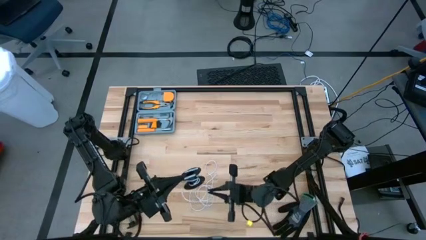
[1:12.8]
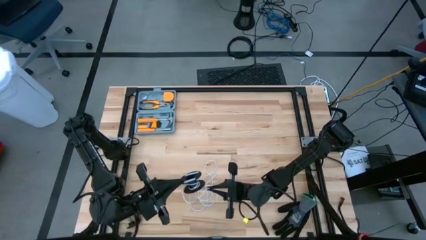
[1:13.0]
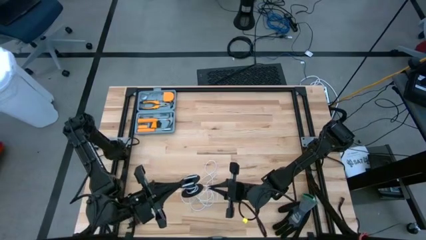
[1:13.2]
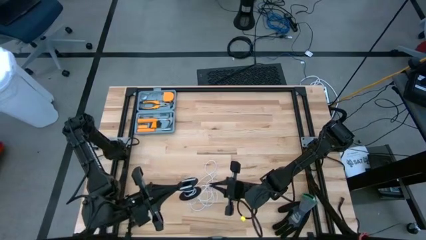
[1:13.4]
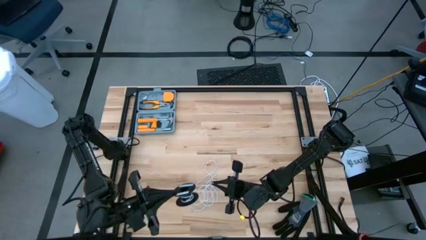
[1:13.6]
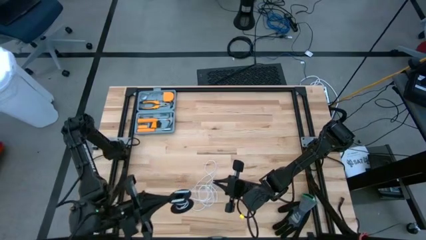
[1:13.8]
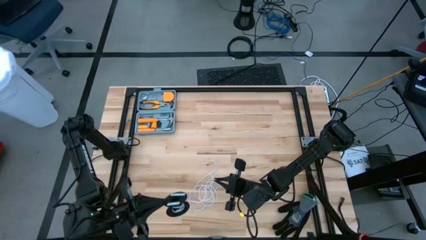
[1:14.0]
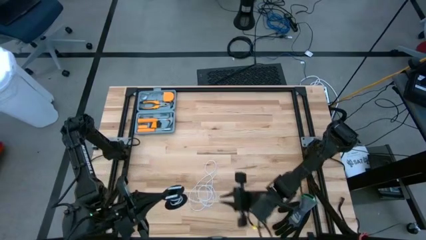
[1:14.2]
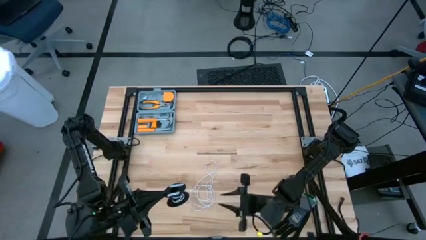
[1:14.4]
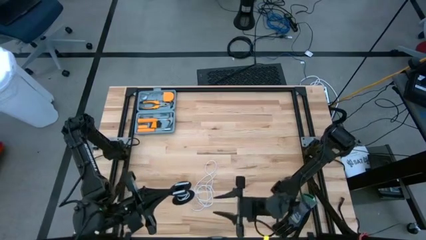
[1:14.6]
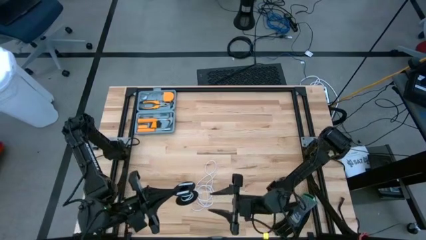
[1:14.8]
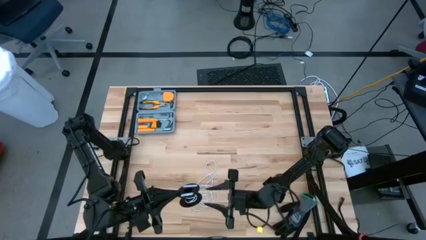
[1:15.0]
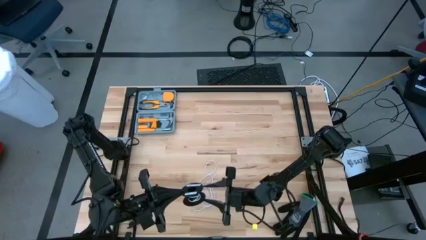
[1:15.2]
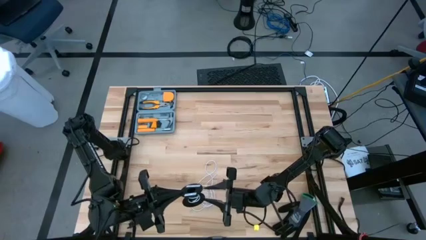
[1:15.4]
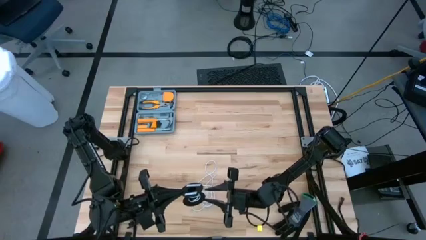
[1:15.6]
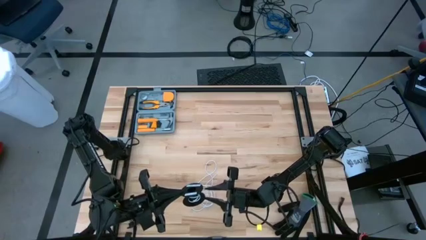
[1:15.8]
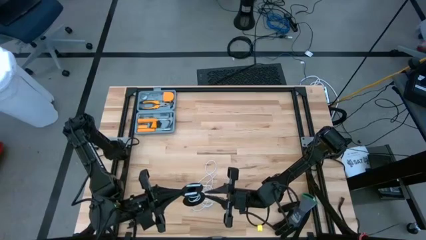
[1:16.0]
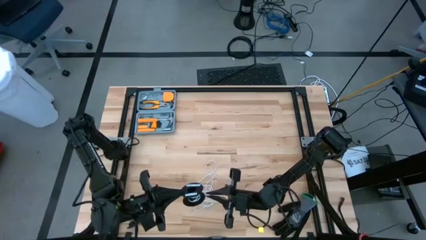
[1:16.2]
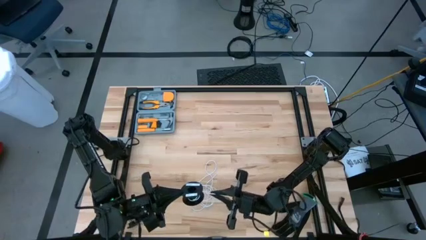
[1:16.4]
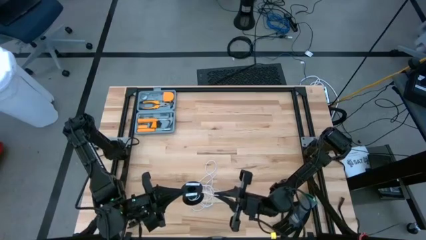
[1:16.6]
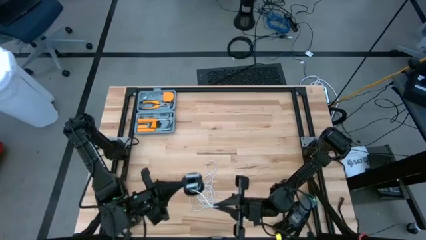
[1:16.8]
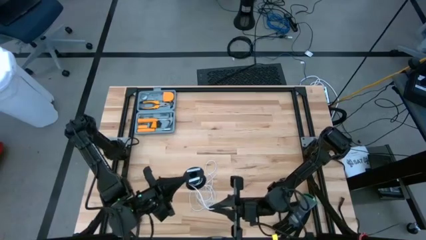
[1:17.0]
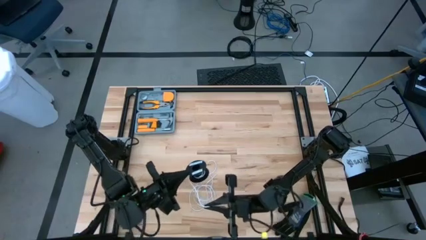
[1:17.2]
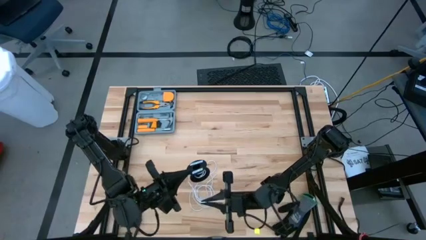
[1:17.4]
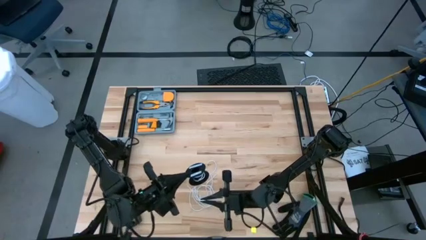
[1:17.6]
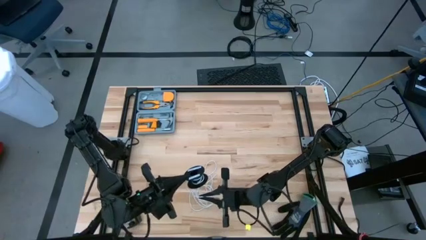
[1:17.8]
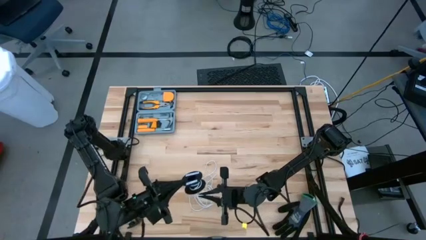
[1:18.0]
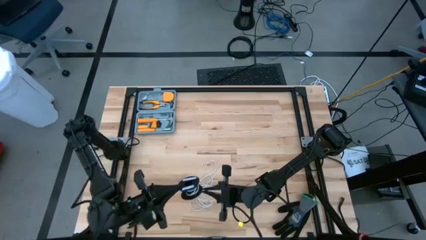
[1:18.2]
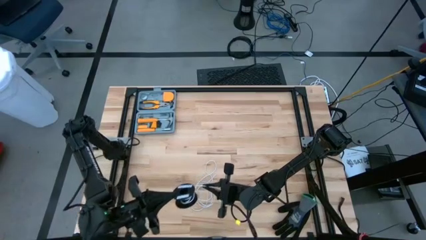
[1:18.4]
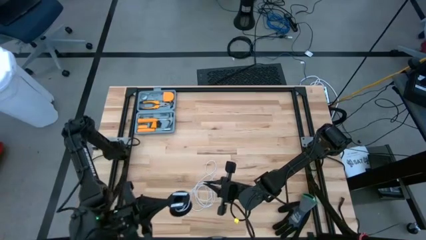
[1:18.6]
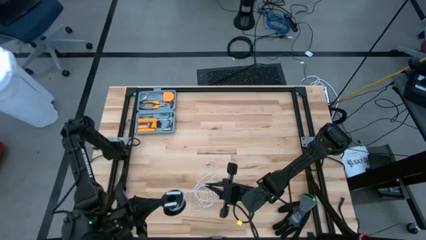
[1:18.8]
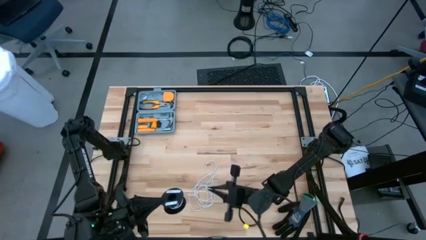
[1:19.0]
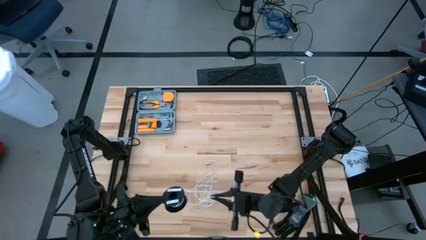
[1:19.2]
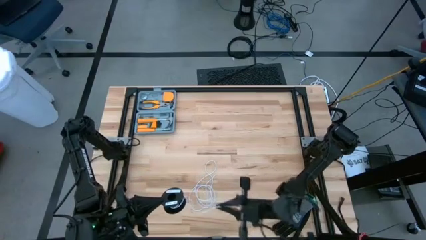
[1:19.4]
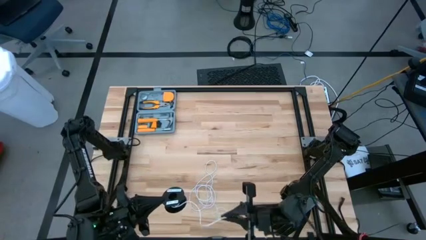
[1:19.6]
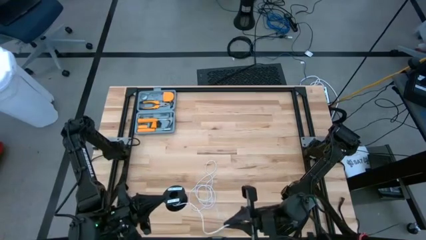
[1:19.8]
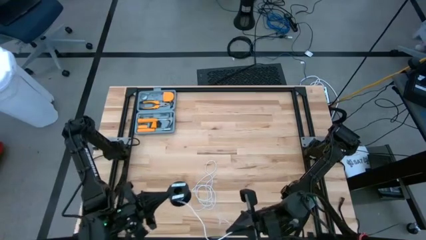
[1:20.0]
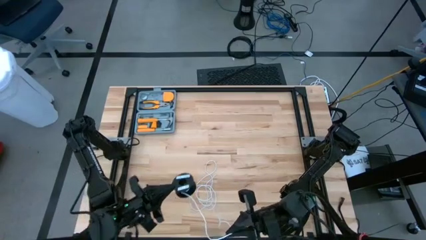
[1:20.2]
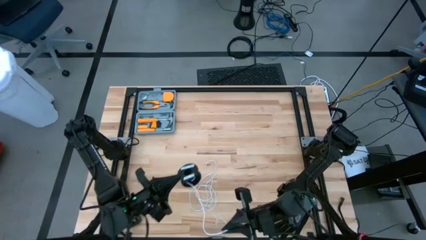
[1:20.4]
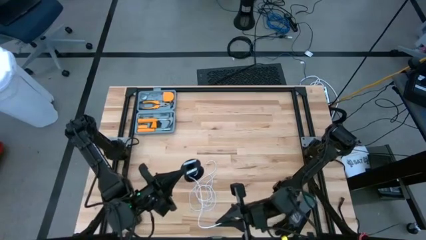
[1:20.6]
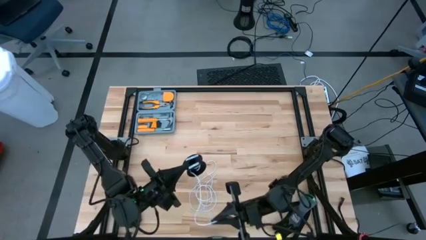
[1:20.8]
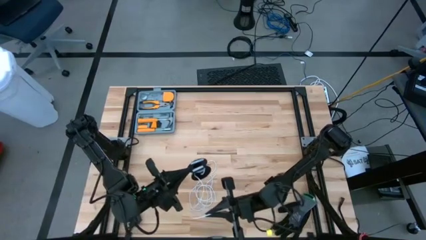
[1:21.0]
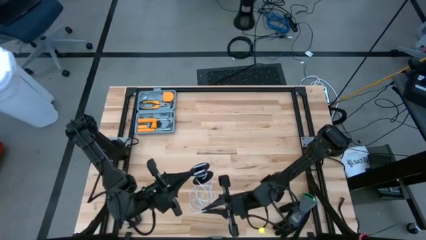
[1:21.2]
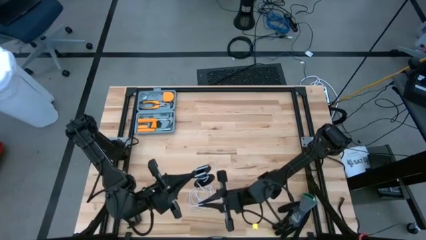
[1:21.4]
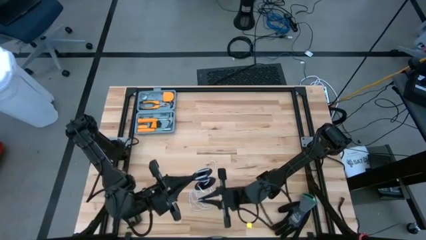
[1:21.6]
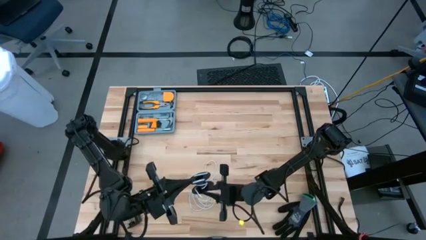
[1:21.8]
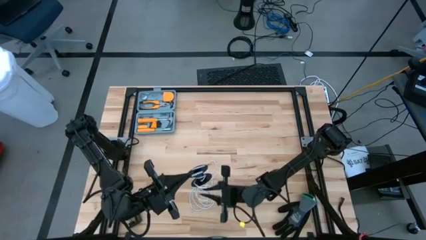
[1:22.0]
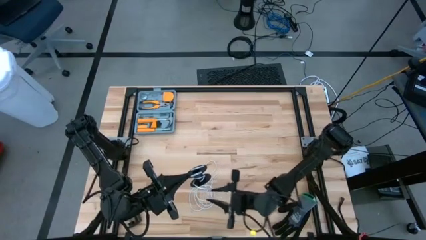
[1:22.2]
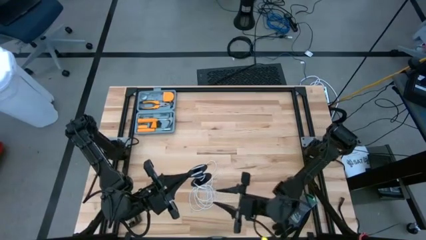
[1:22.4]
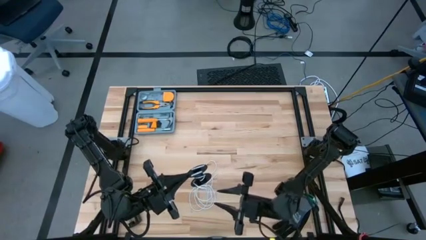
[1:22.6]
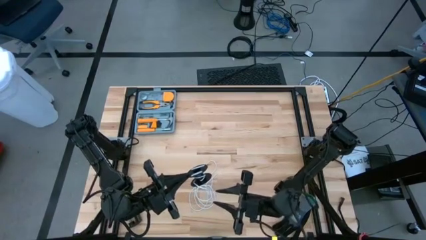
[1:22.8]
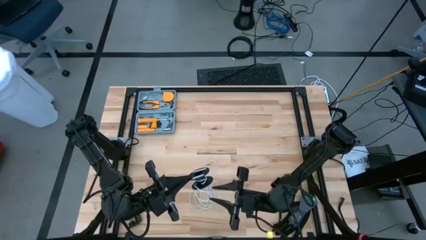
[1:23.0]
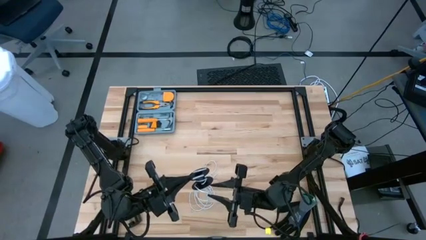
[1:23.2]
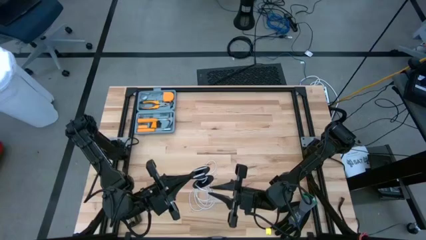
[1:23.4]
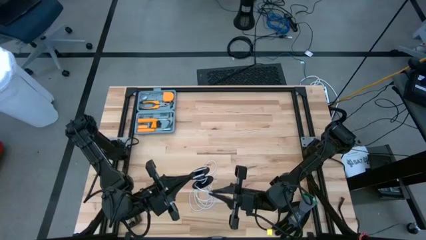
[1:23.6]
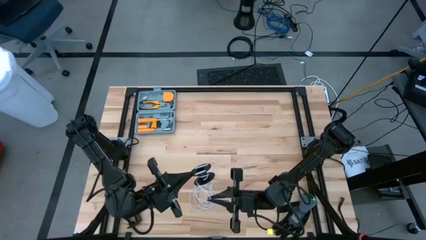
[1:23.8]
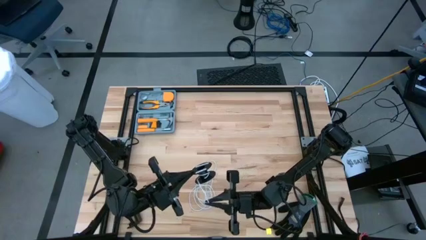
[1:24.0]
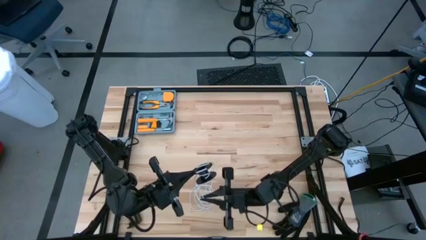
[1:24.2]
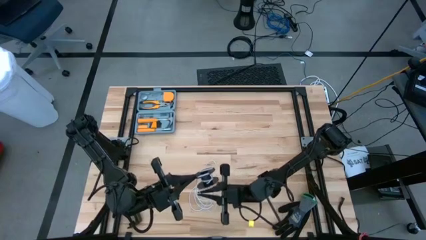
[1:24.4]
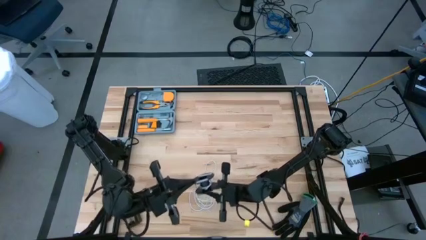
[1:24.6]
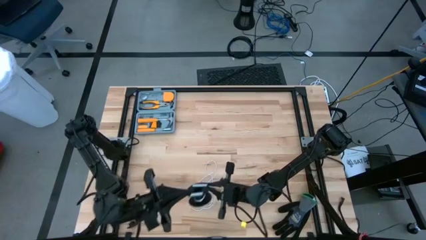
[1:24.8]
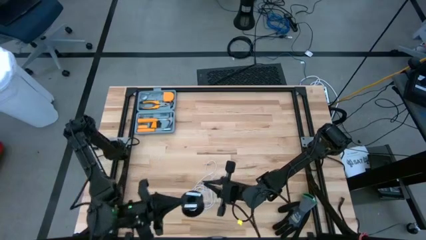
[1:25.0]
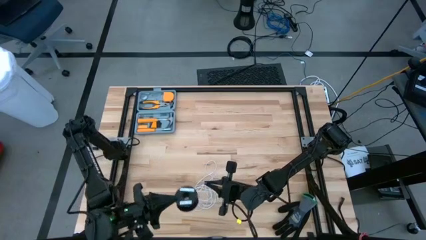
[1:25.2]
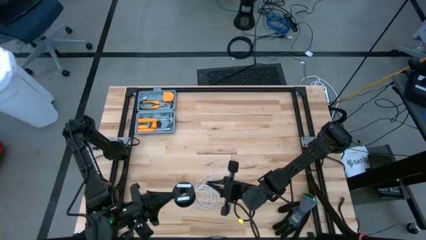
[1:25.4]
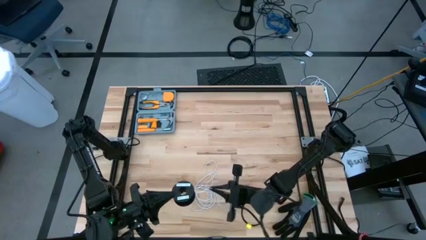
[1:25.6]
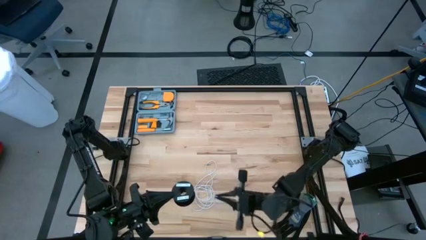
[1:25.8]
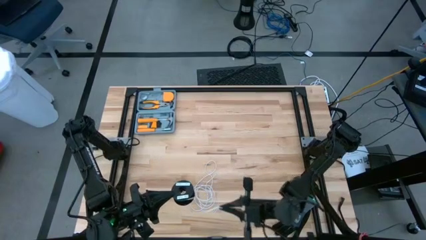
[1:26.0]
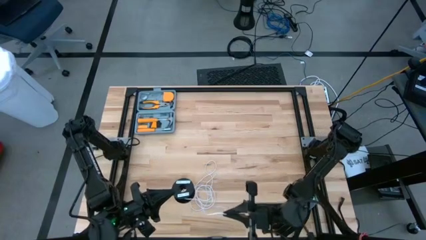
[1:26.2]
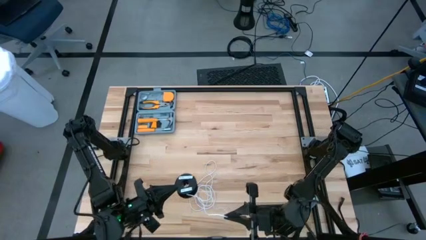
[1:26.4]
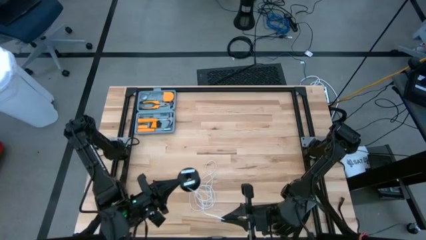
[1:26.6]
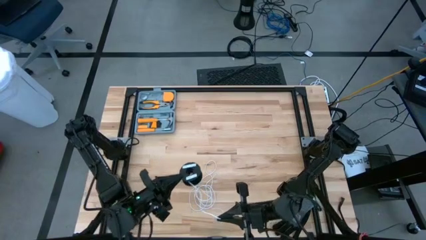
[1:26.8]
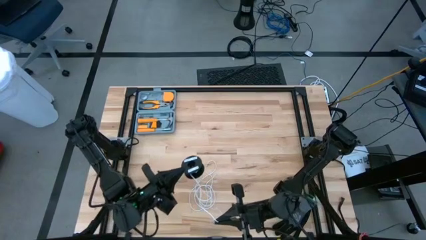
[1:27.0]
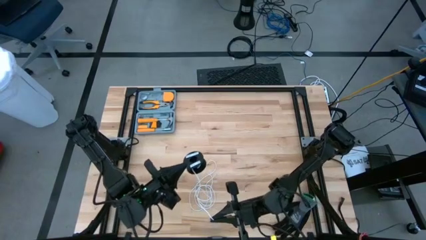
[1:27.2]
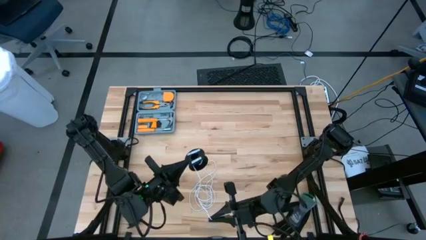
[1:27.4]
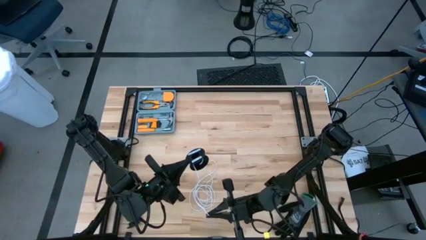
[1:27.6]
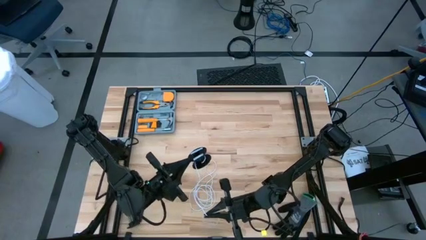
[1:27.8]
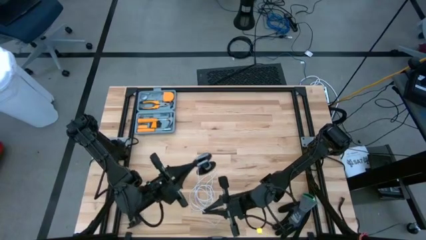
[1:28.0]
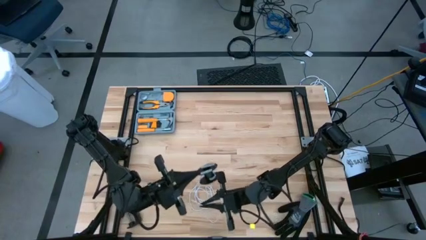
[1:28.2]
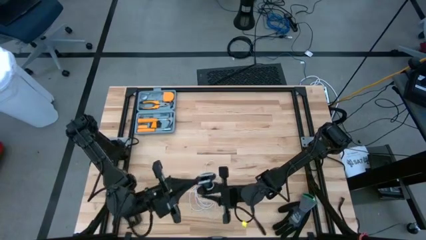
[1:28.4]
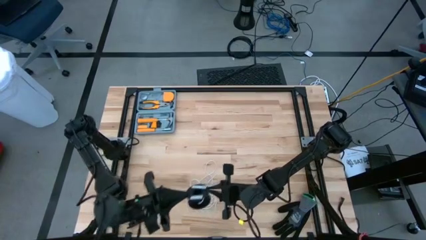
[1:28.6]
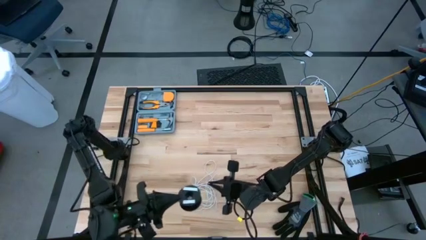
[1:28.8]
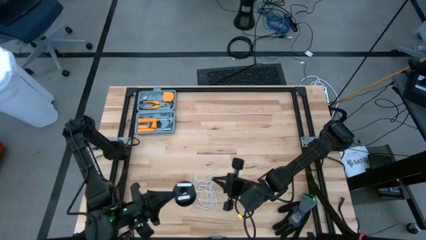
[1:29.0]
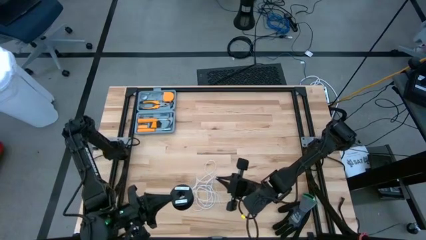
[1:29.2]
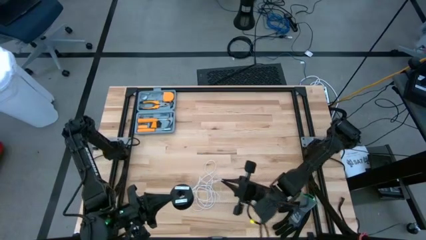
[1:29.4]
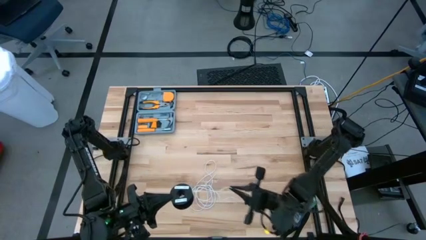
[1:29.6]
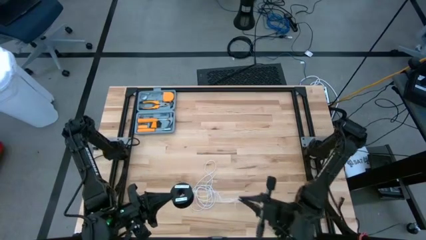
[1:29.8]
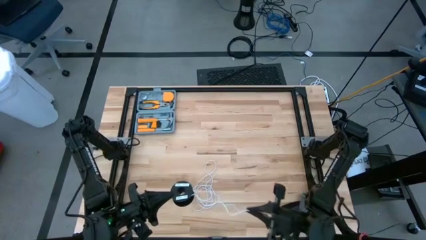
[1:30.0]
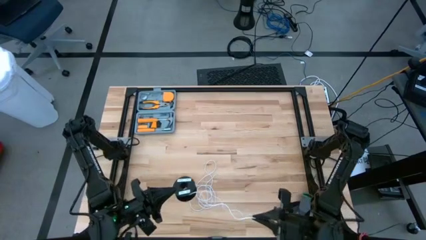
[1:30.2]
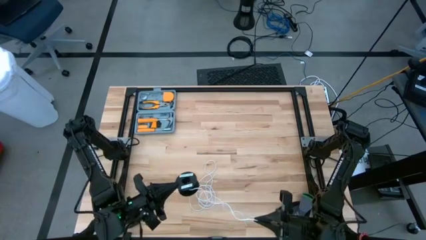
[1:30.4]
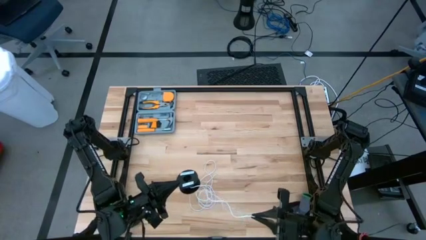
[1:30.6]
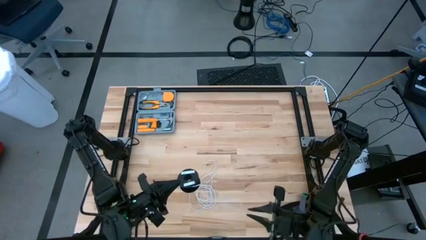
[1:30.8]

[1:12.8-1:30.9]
Task: Coil cords
Uncoil the white wire from the spool
